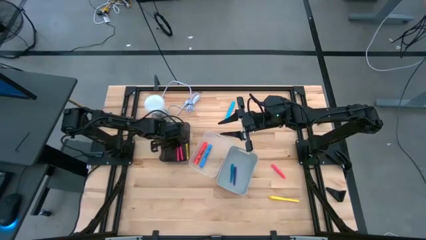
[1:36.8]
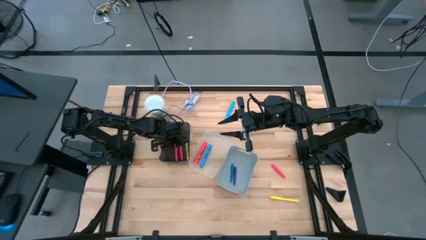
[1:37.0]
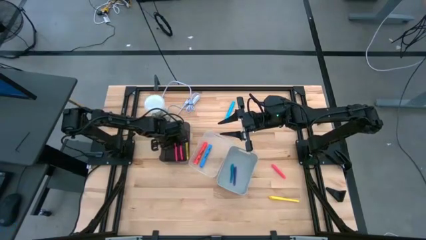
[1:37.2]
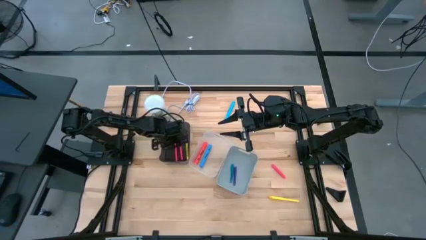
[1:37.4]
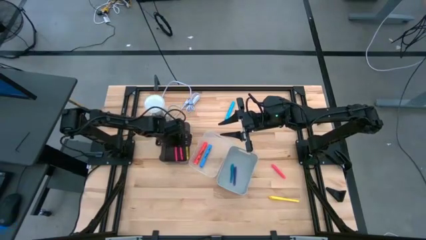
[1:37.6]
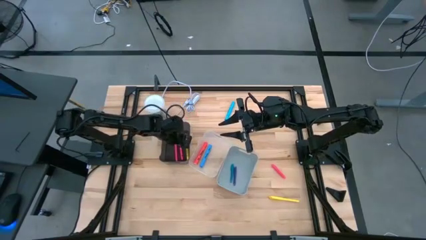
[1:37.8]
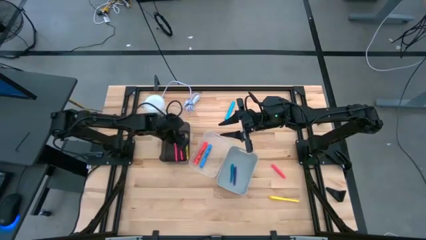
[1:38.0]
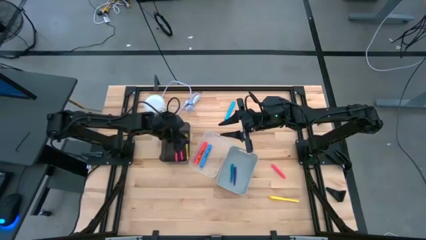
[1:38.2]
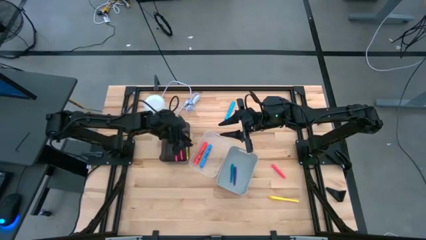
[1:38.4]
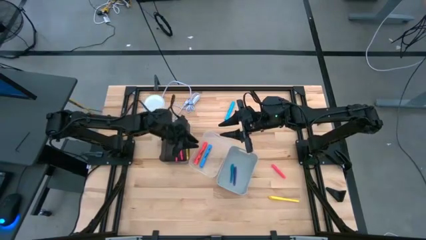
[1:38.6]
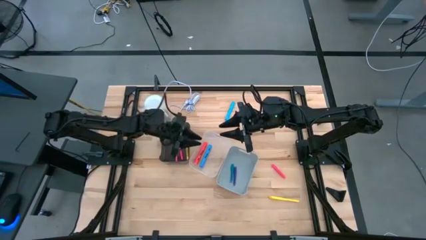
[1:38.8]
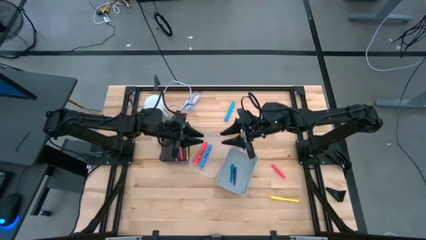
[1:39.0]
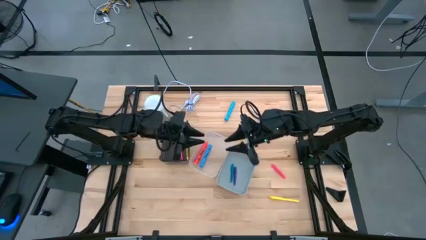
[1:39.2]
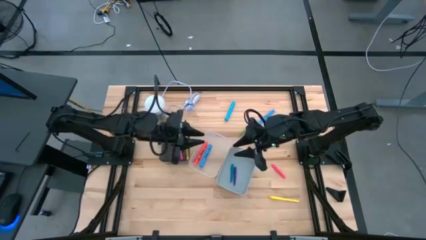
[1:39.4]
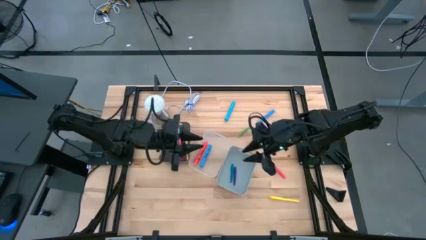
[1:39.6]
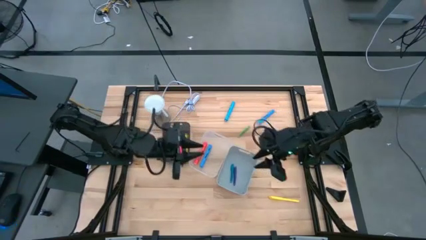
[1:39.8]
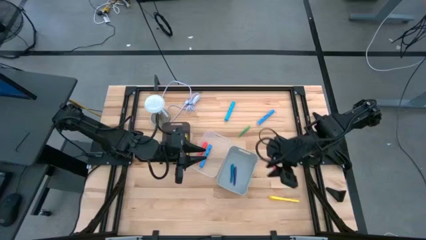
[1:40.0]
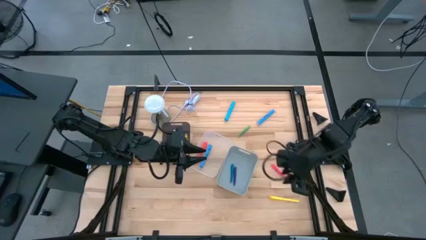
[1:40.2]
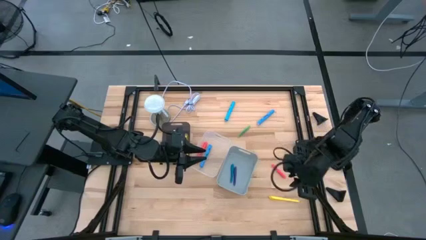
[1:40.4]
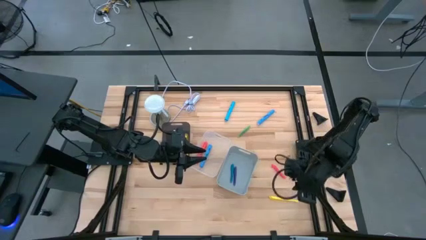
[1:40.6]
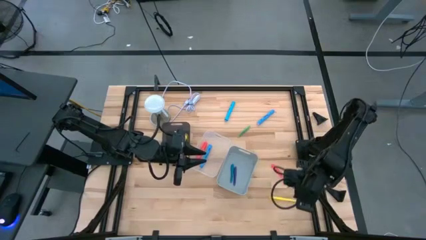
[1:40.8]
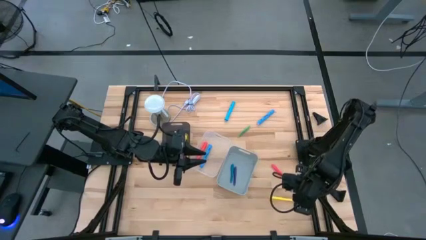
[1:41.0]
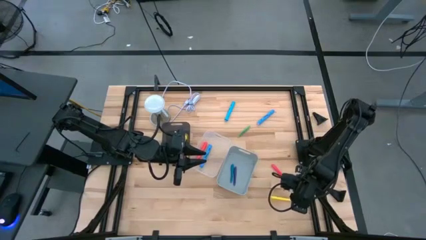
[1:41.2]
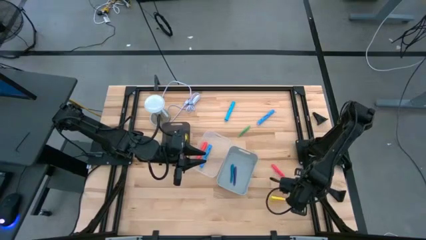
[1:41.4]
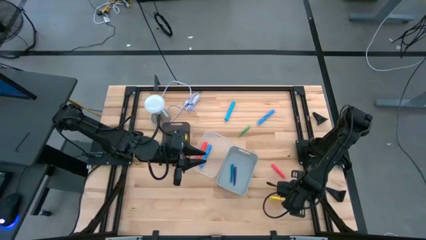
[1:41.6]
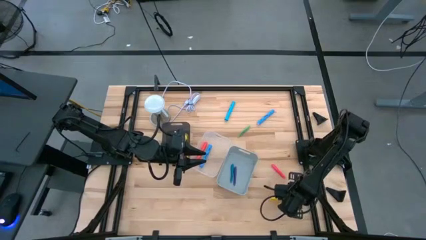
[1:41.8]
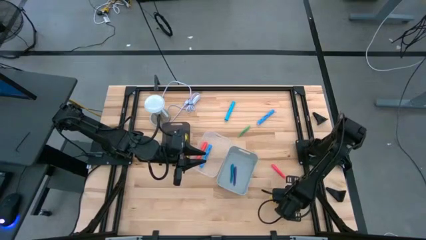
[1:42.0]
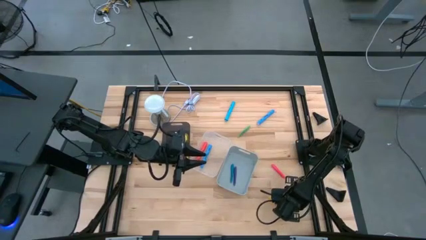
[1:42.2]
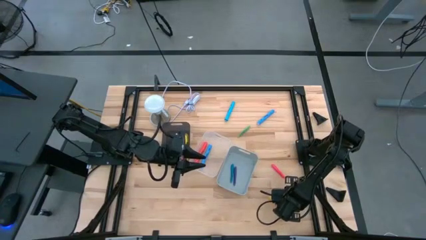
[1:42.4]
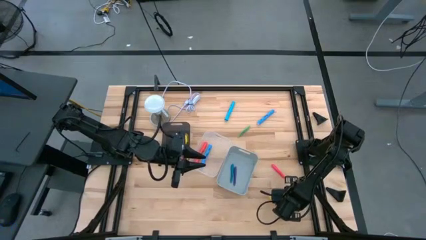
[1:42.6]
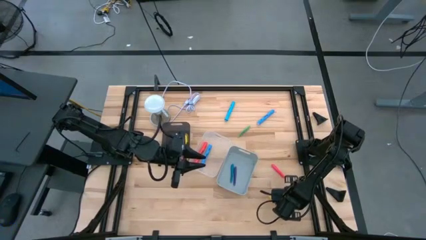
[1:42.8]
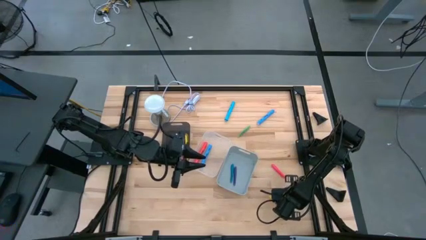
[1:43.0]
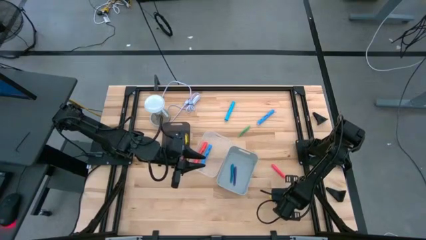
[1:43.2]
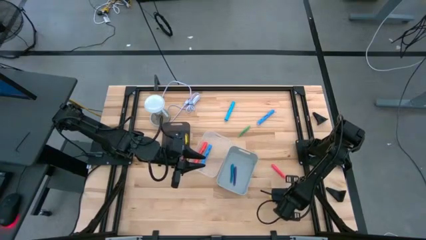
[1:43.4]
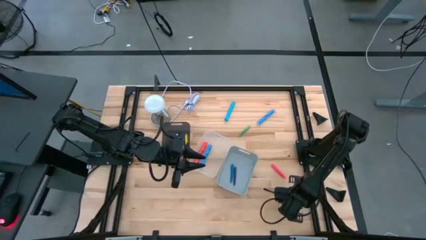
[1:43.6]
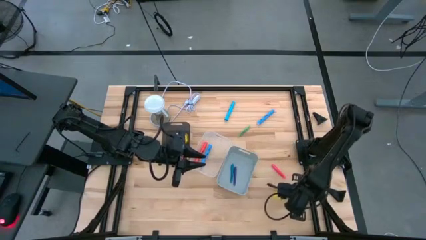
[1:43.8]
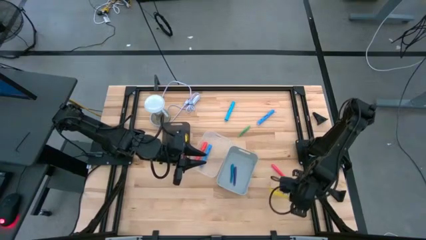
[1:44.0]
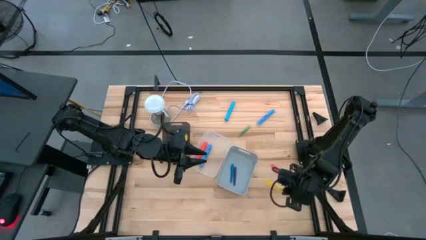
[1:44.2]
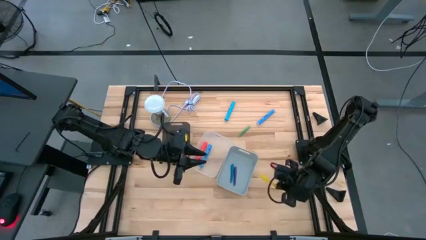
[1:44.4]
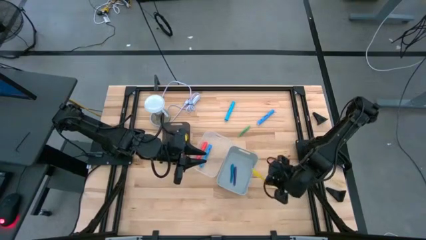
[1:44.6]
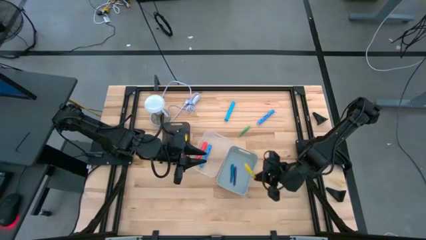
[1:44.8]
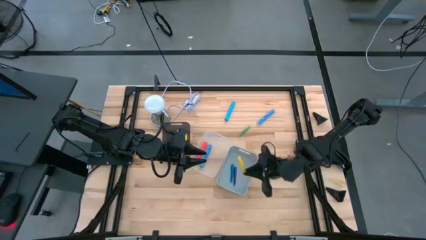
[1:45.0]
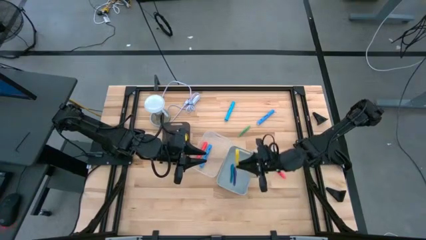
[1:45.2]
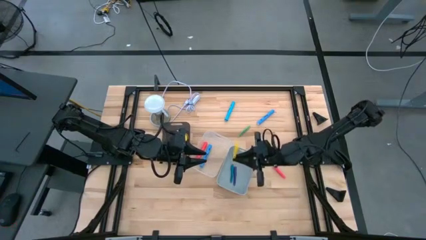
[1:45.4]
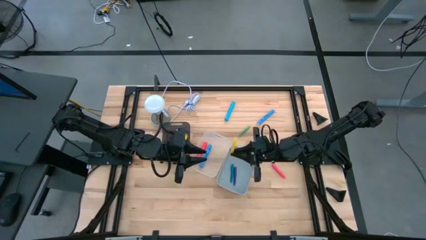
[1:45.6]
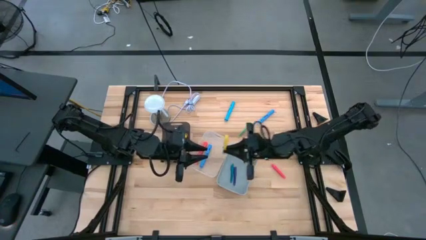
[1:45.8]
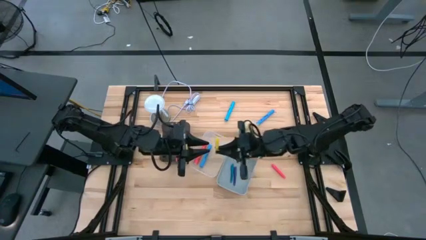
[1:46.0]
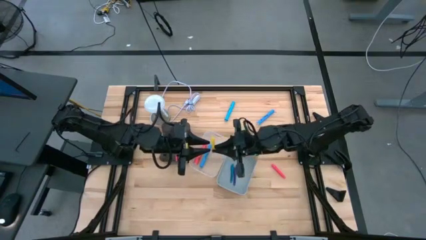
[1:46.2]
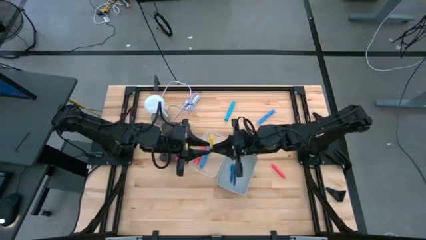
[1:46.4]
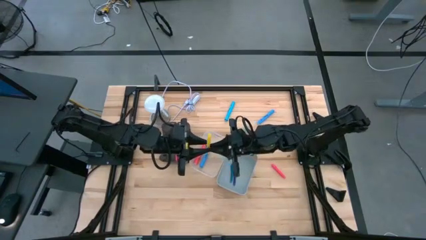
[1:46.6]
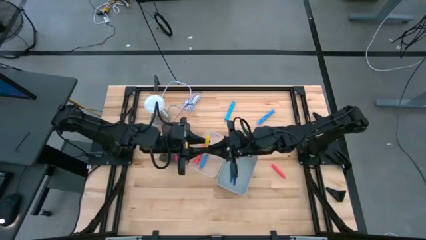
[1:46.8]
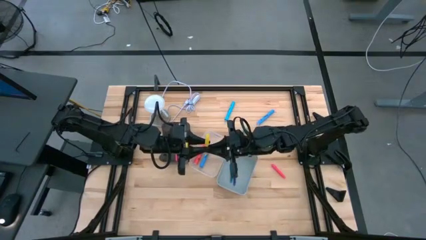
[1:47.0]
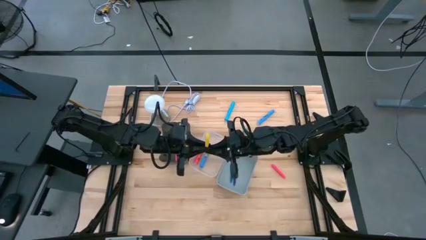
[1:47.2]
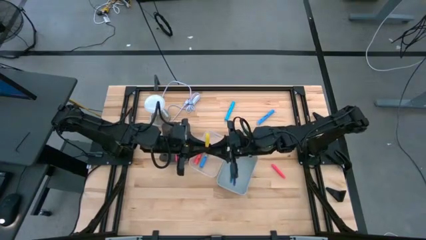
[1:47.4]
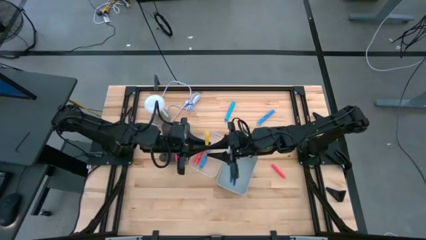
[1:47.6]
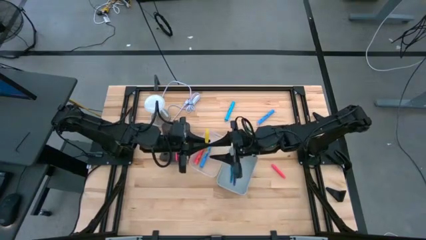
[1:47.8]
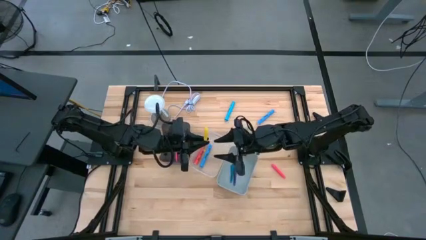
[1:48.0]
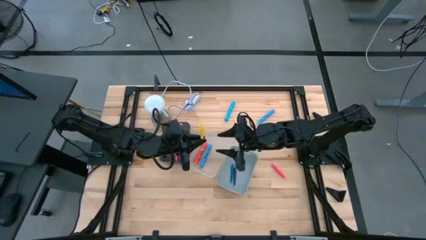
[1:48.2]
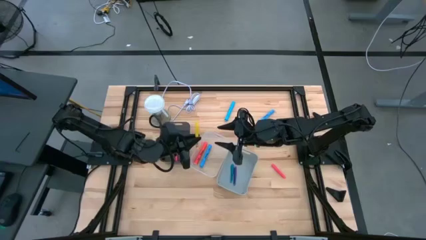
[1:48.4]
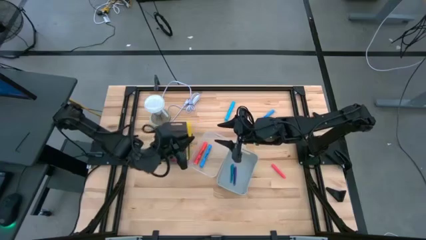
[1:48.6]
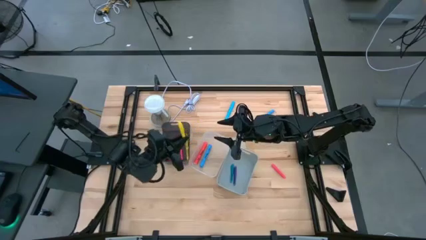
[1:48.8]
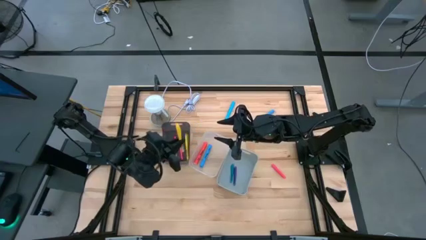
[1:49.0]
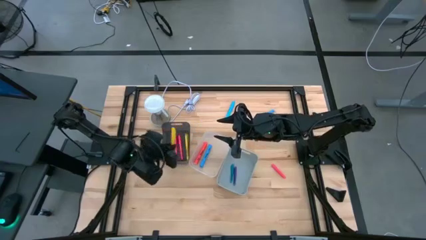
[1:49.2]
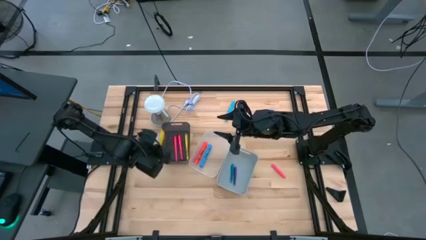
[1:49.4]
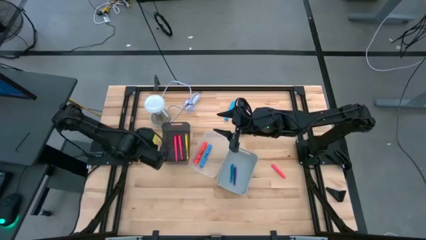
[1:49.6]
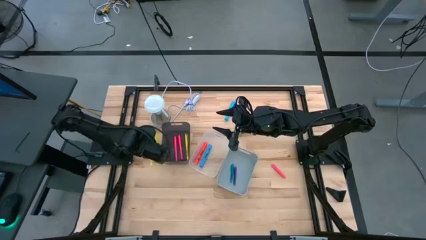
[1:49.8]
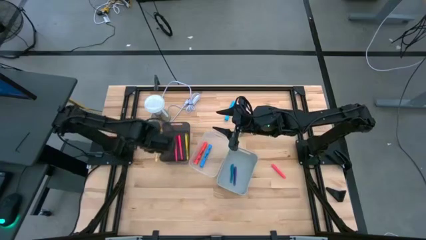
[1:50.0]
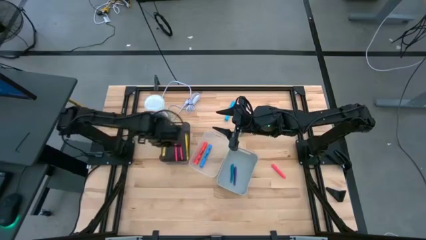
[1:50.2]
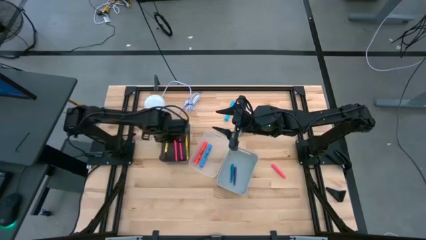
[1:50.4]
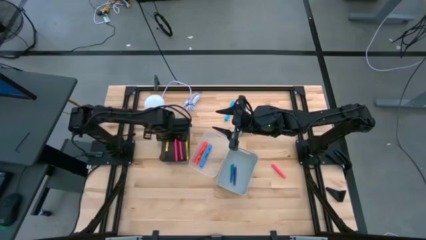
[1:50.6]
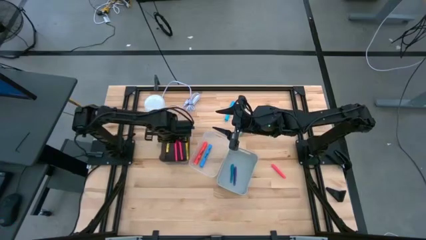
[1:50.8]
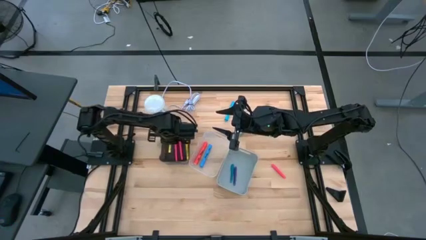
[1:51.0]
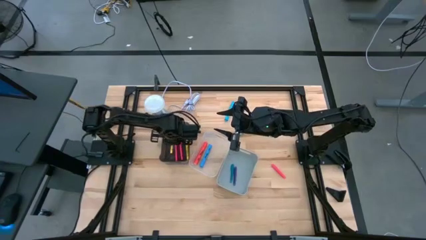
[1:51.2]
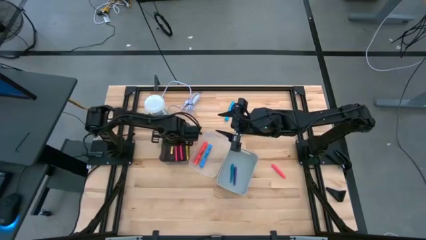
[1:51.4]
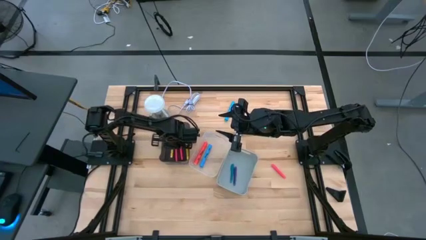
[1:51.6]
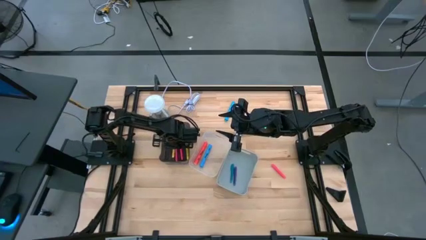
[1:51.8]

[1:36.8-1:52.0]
Task: Pick & Place Markers
Put the yellow marker into the black bin

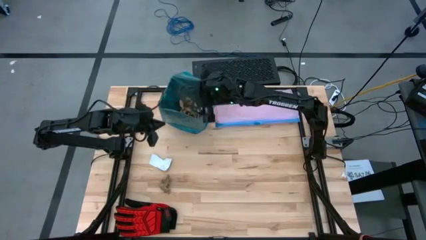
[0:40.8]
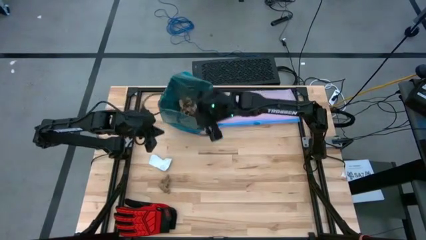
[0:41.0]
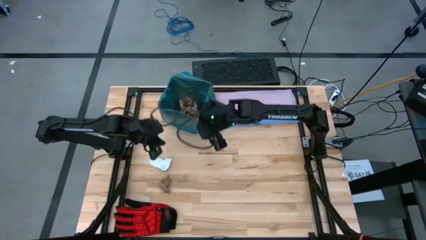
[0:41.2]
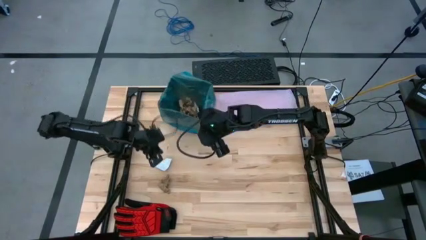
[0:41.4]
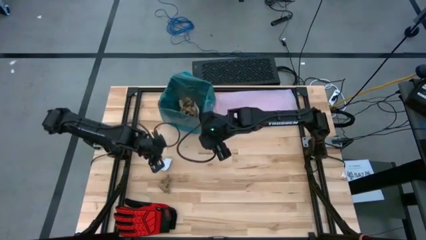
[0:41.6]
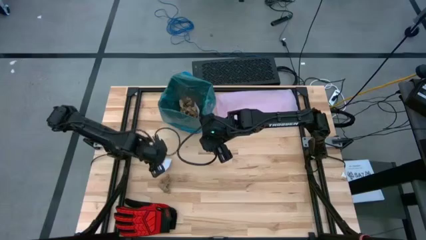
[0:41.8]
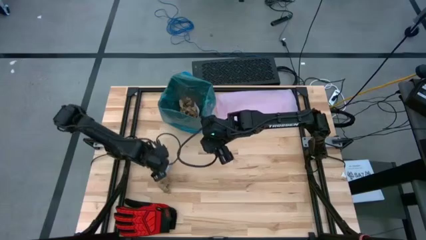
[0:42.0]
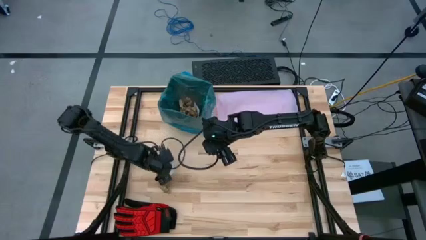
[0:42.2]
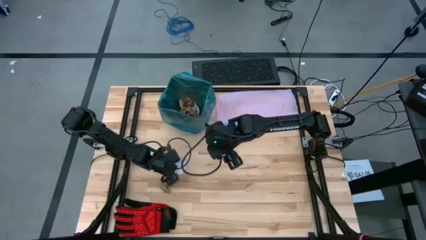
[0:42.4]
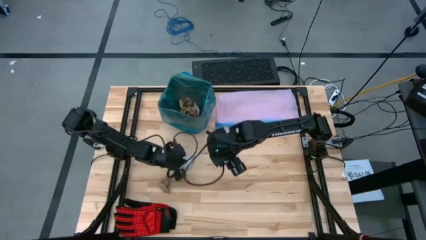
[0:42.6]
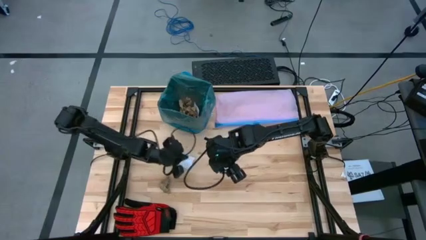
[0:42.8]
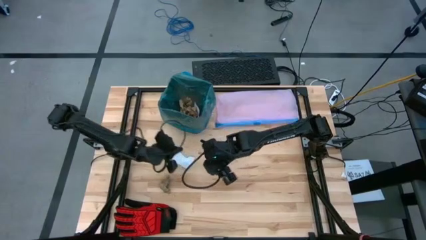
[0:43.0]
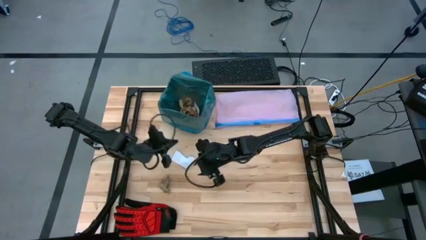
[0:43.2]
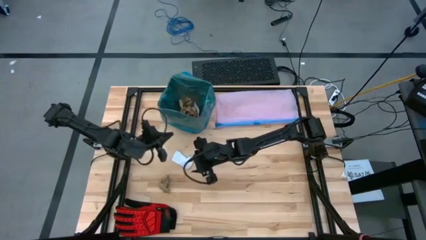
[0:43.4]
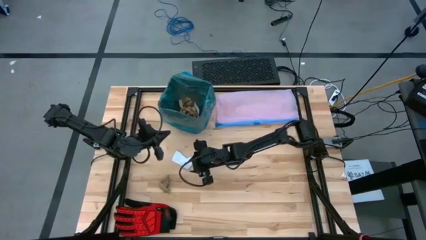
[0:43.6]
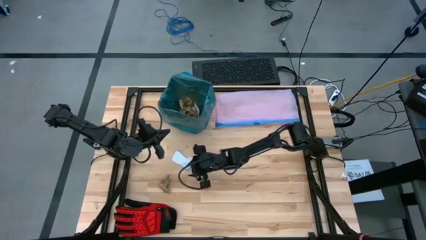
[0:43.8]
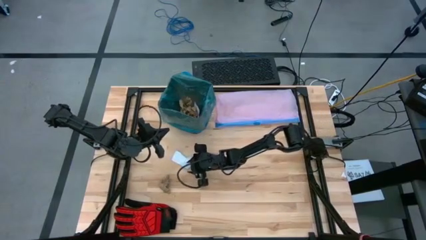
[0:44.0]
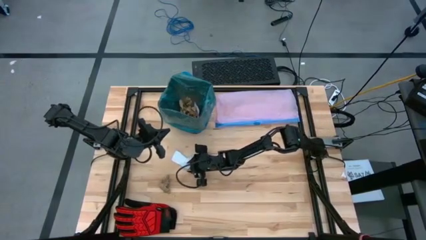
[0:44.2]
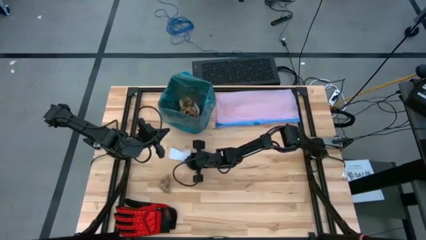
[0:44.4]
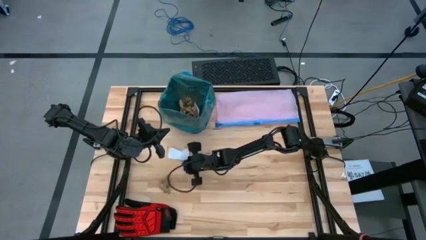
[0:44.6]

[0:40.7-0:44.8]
Task: place trash/remove bag and relplace
Put the white paper into the trash bin
